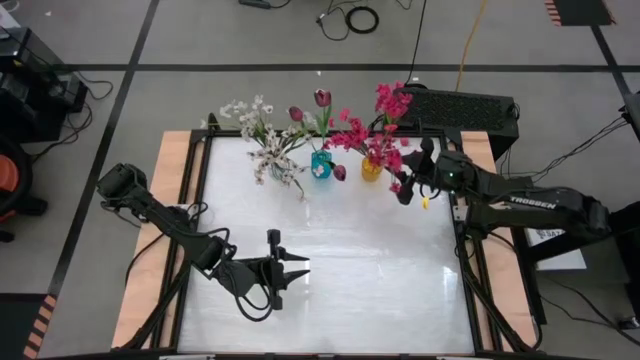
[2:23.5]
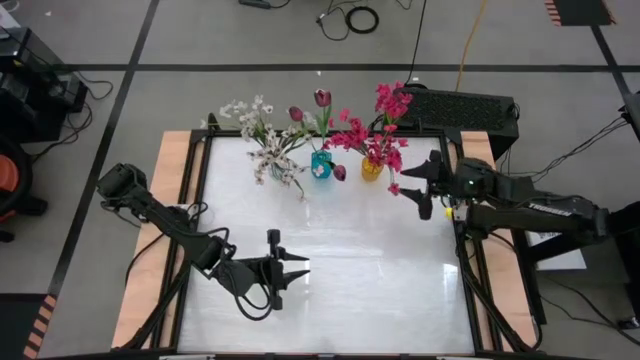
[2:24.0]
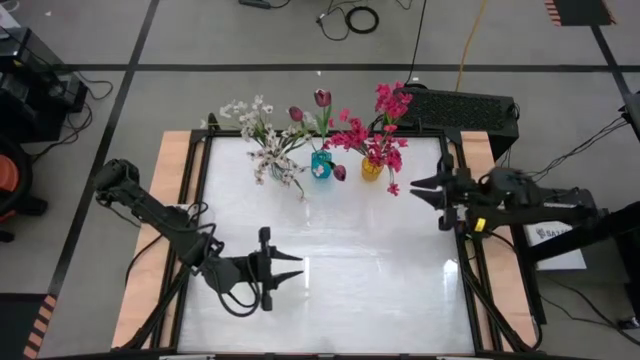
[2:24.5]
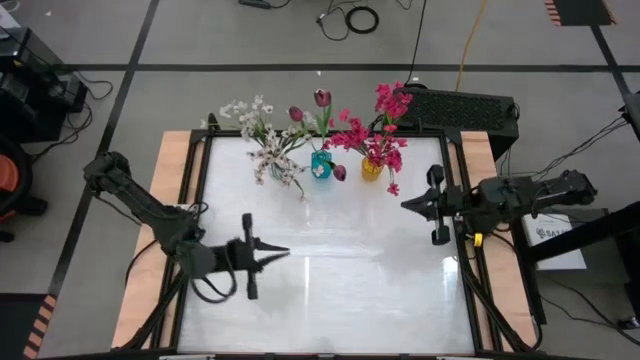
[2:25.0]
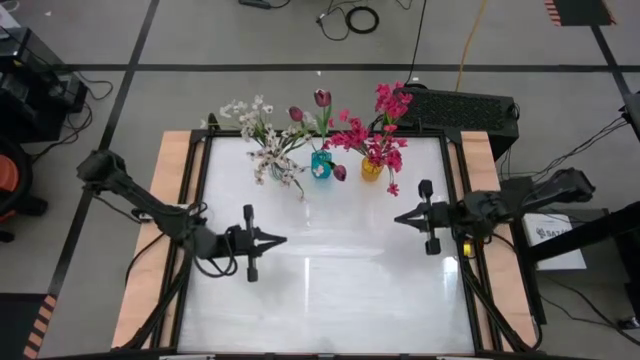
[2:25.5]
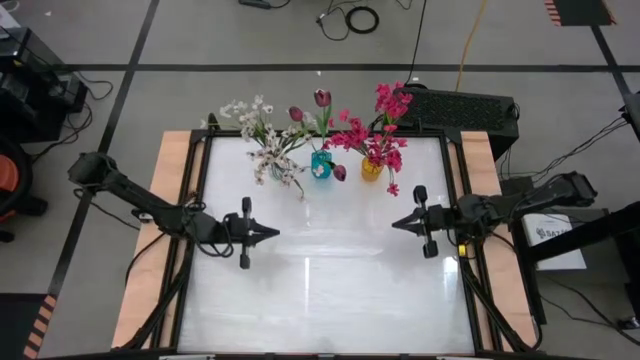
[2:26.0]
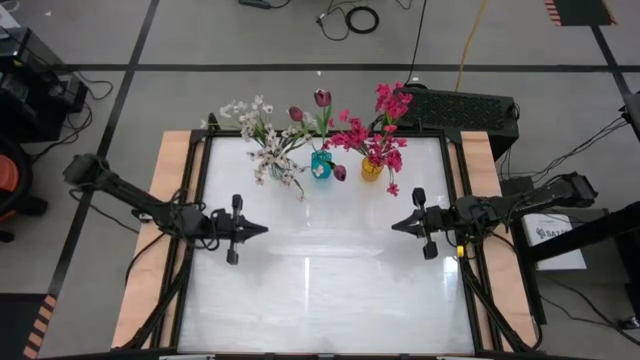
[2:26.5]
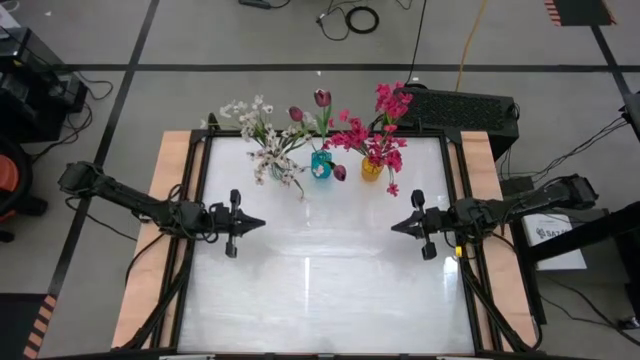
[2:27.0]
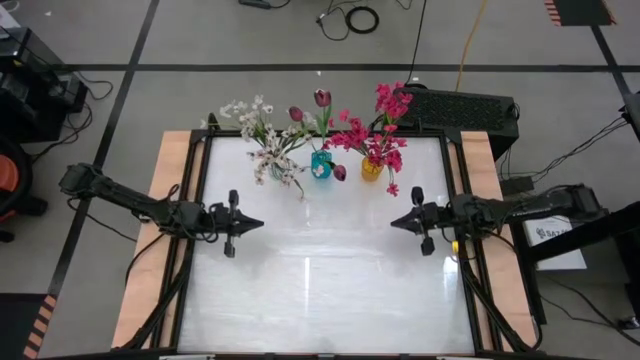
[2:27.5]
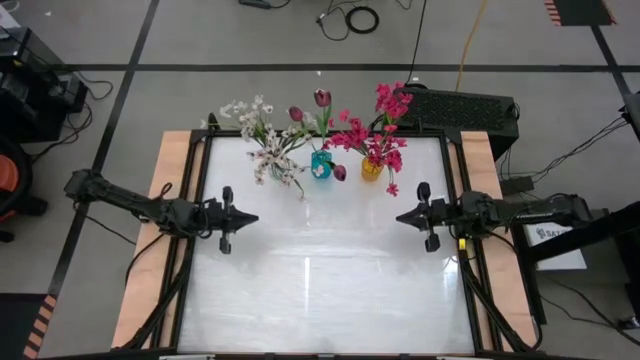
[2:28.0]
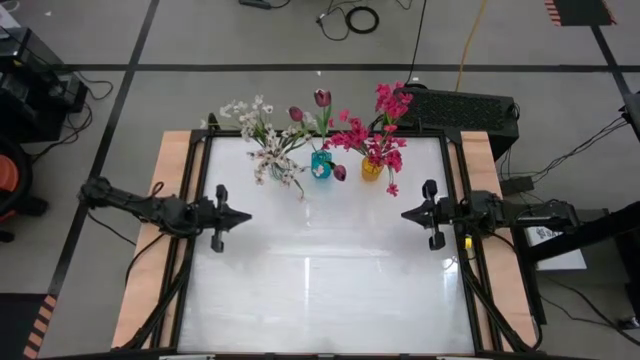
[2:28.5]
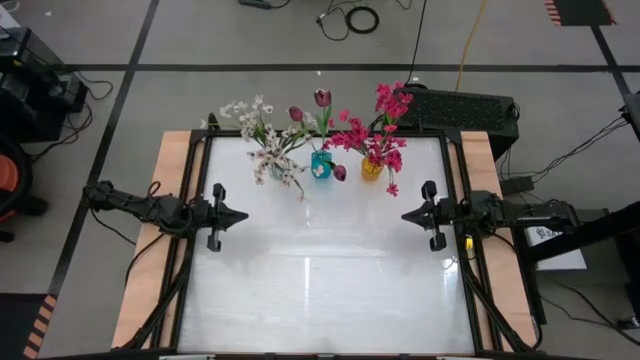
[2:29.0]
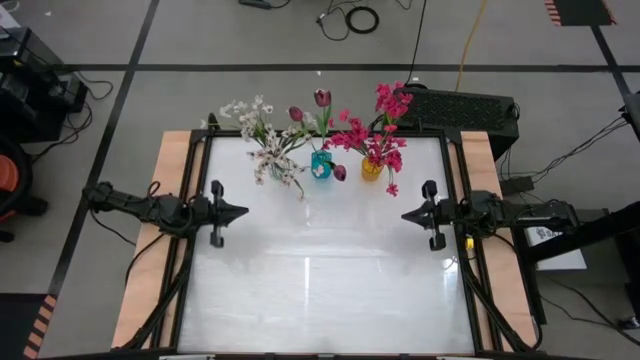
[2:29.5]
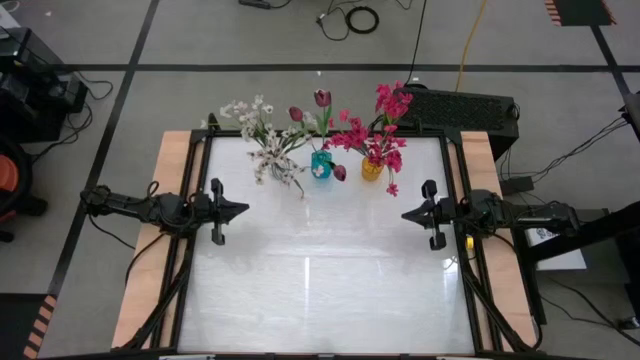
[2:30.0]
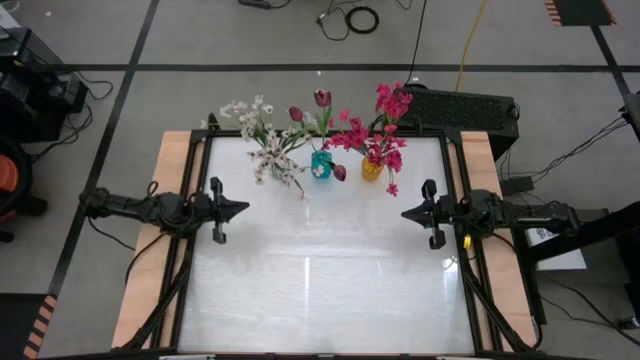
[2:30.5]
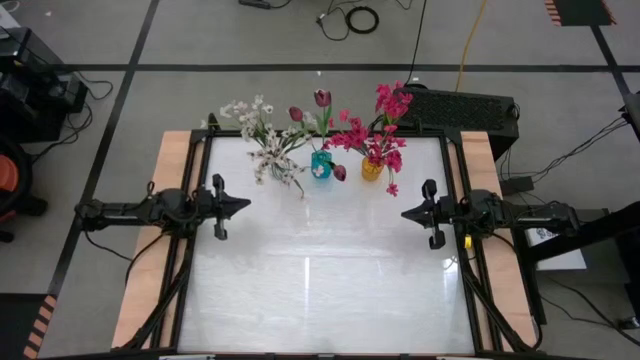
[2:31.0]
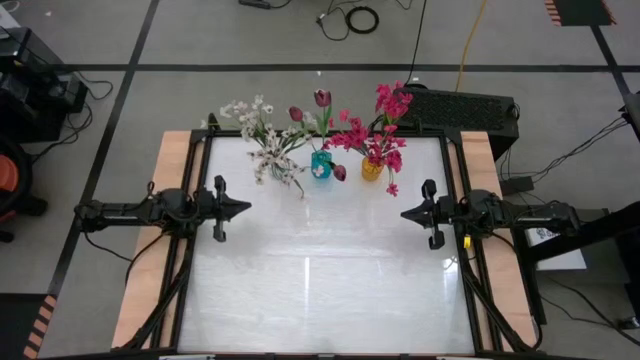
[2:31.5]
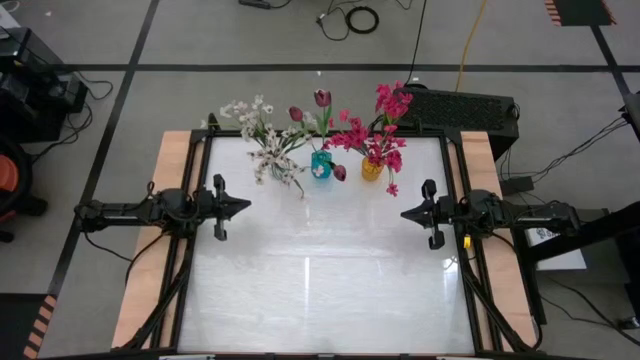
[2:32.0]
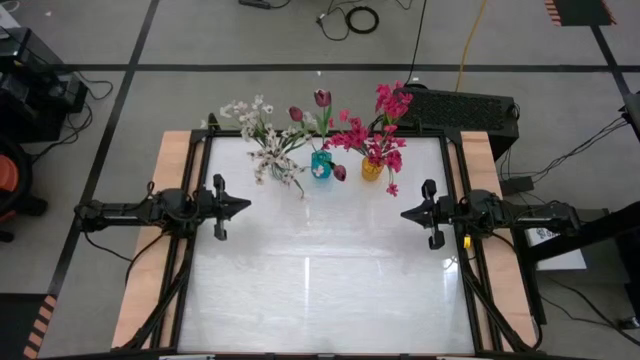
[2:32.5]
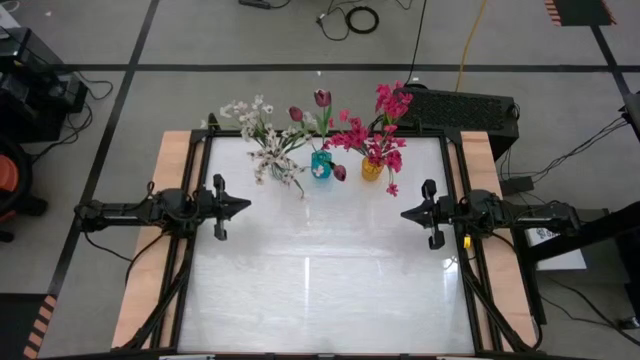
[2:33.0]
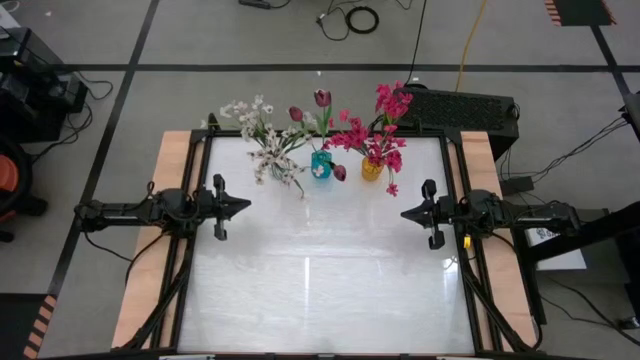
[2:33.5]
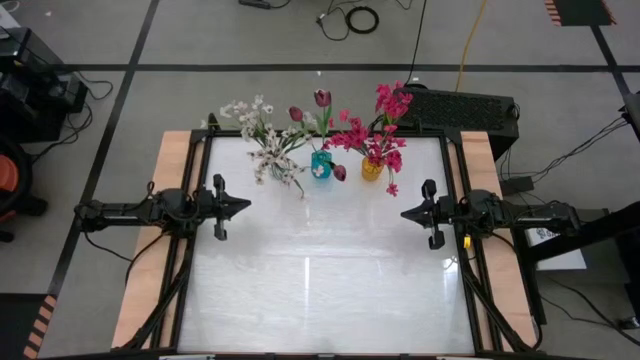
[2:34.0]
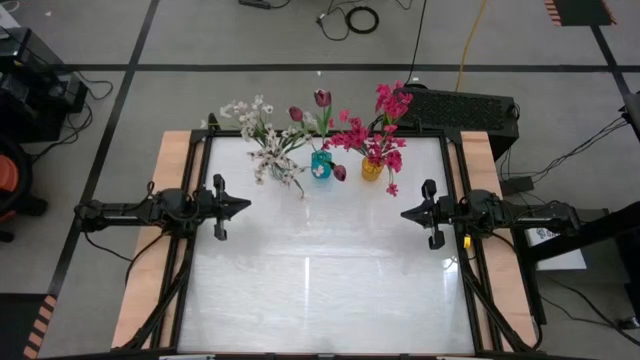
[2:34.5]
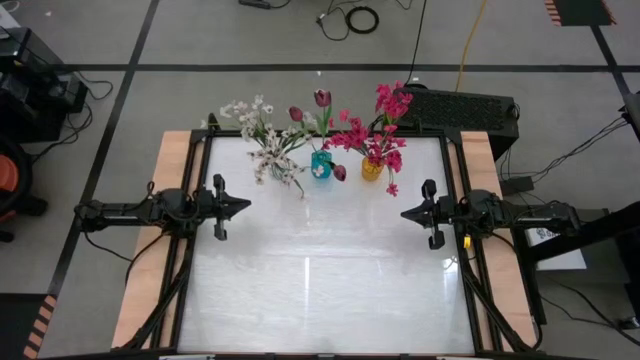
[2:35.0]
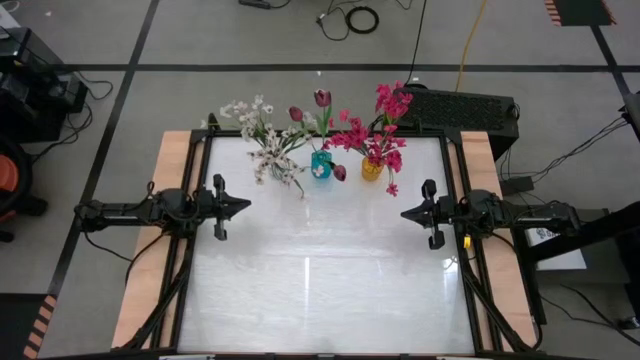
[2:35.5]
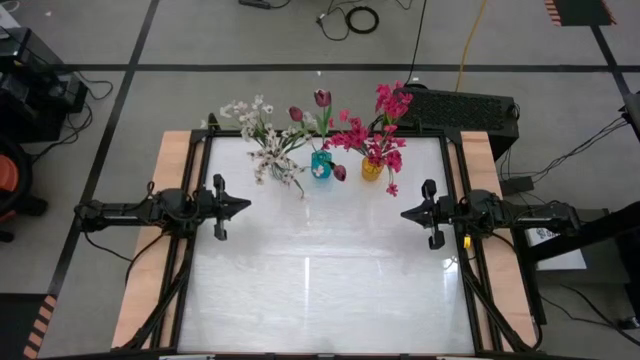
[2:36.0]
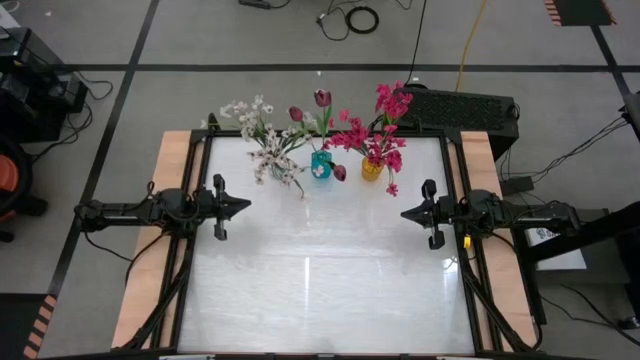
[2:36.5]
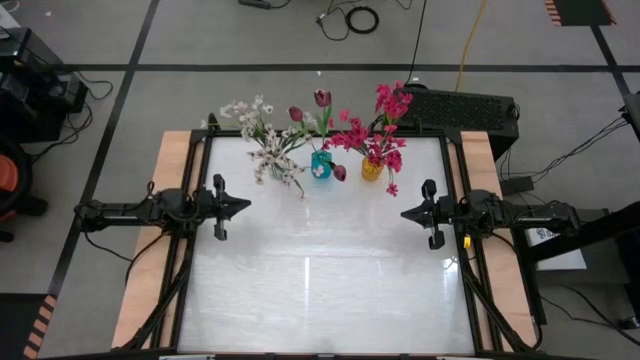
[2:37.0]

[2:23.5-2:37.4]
Task: Sort flowers into vase by color
Return to Home Position

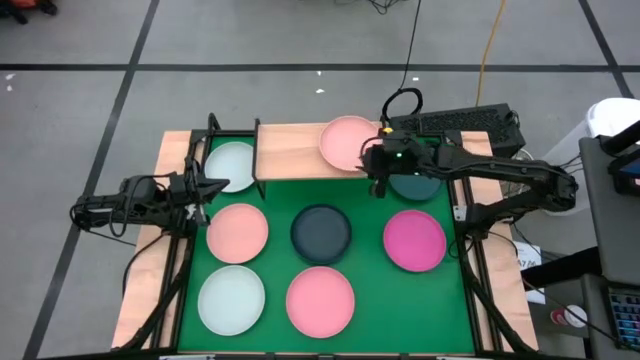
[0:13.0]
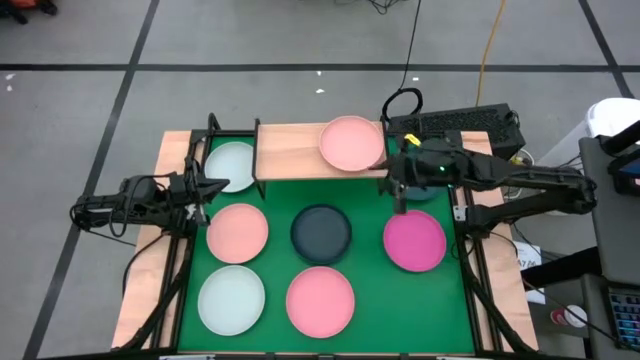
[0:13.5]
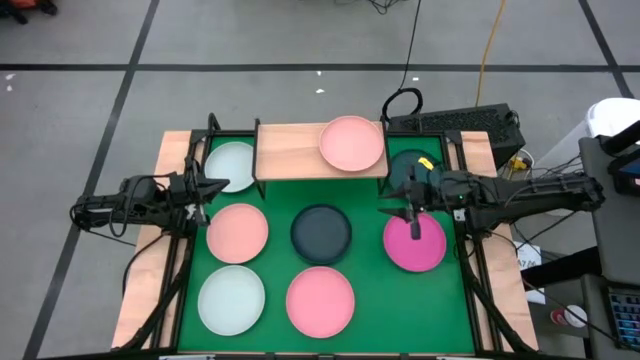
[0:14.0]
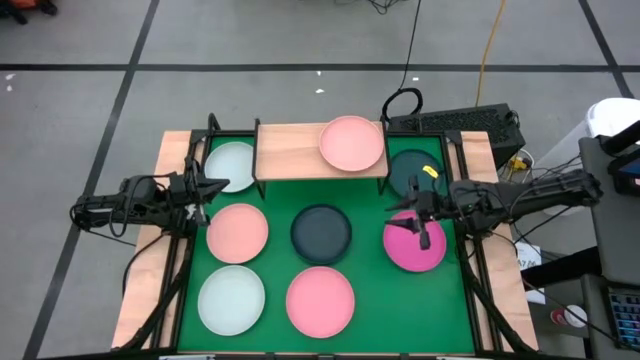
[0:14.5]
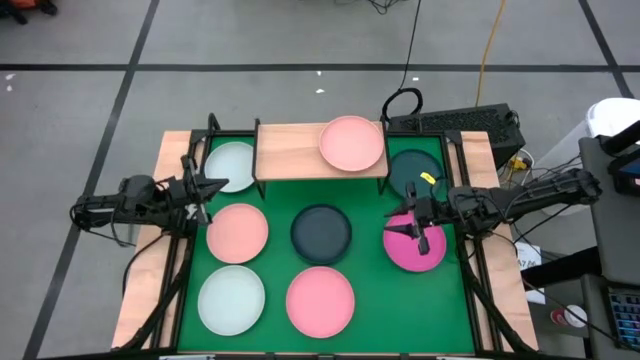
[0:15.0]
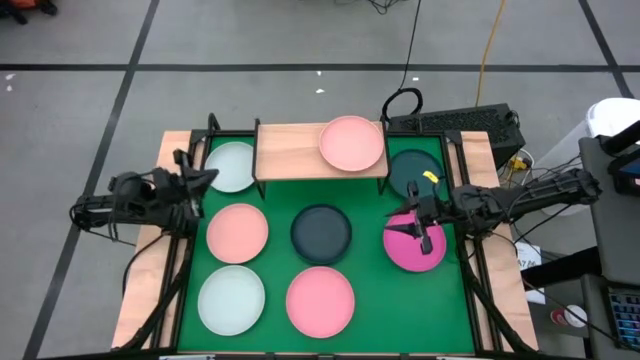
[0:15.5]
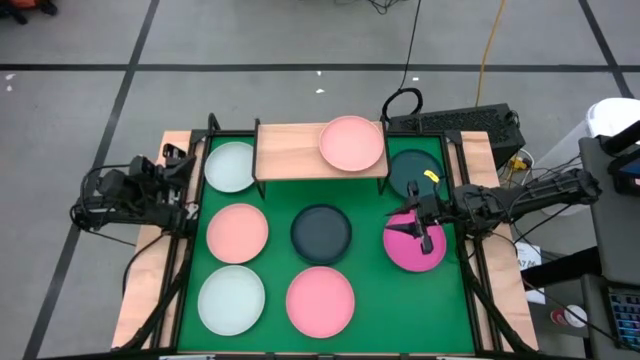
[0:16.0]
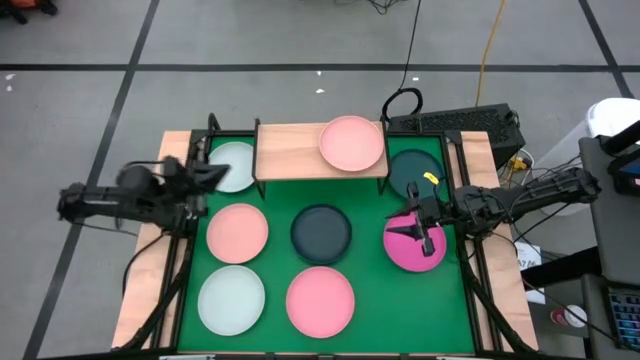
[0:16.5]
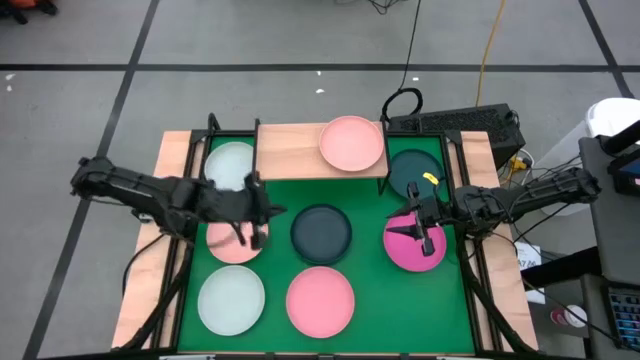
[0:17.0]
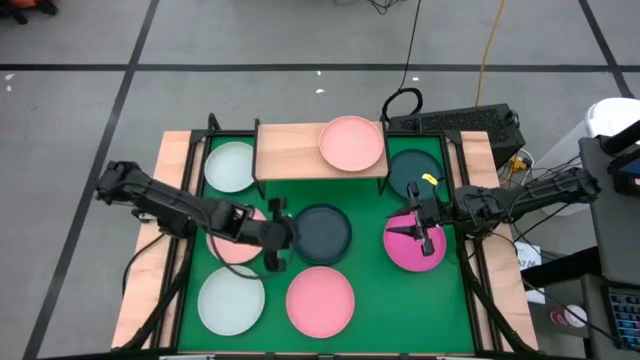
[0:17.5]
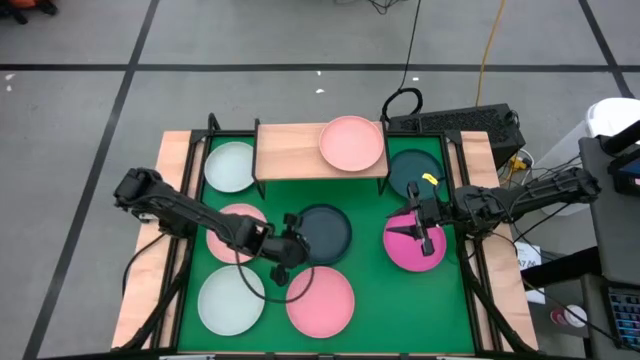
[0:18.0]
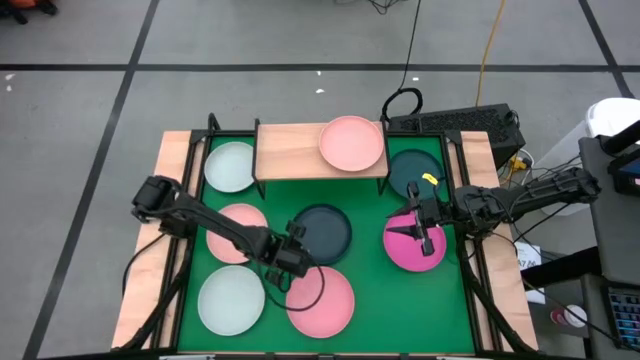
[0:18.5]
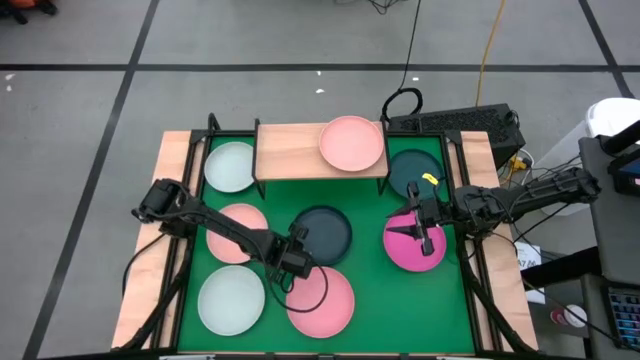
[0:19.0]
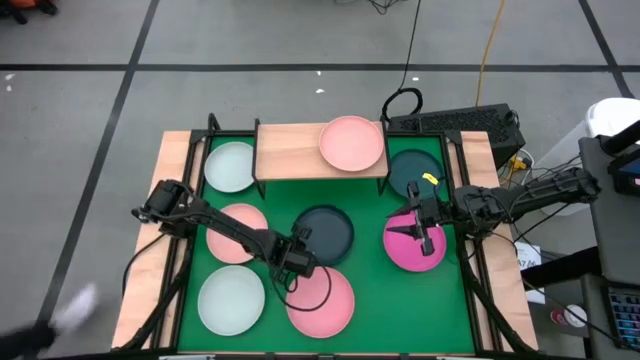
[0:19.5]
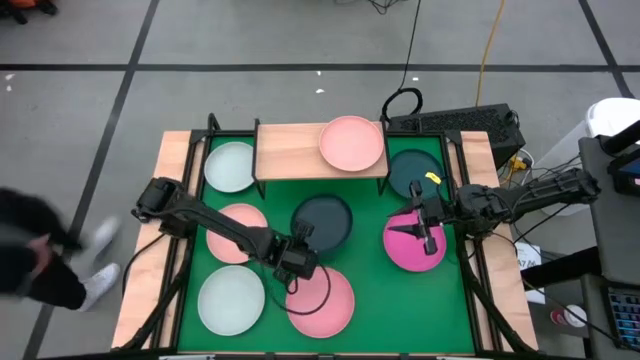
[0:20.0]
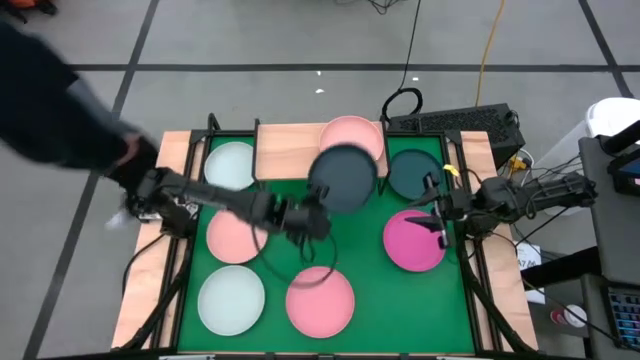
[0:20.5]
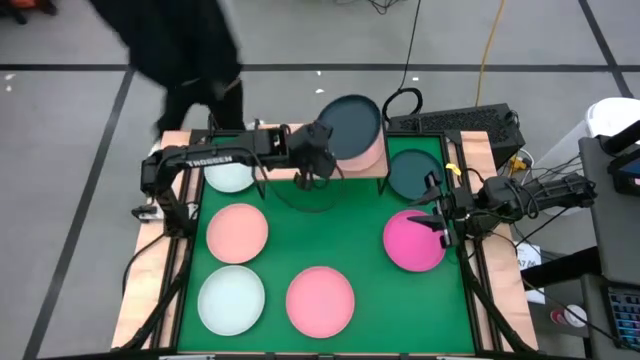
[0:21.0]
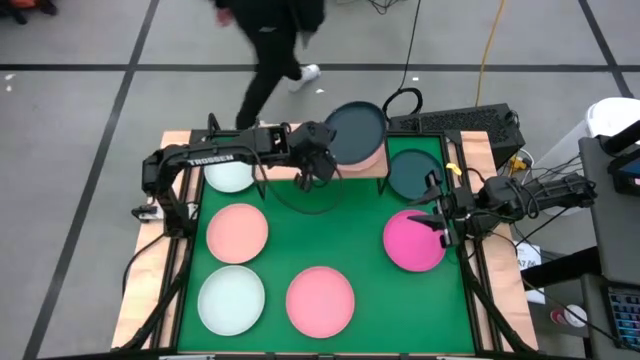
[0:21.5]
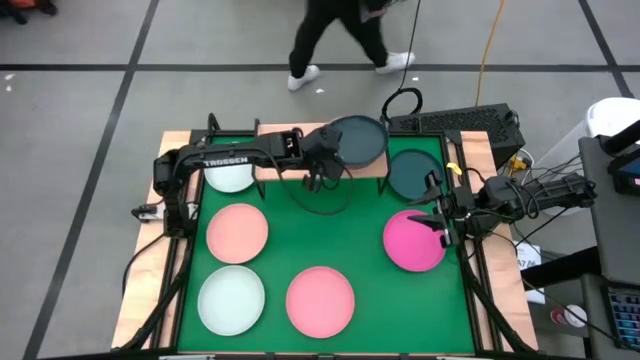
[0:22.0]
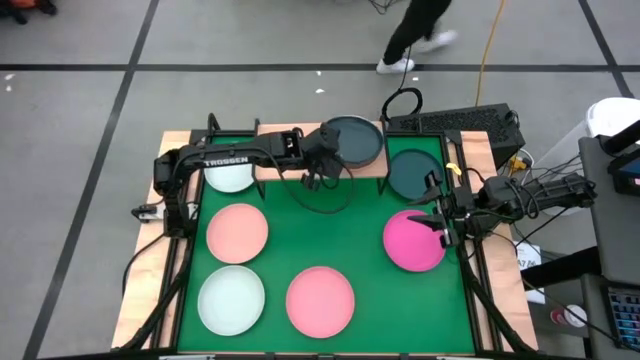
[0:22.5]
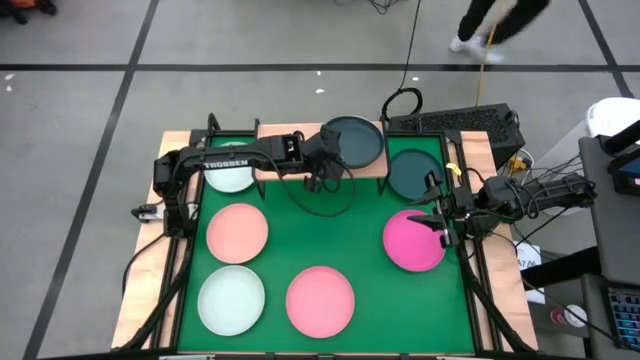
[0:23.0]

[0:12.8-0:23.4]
Task: Place and stack plates onto a shelf
Stack the green plate on top of the light orange plate on the shelf
